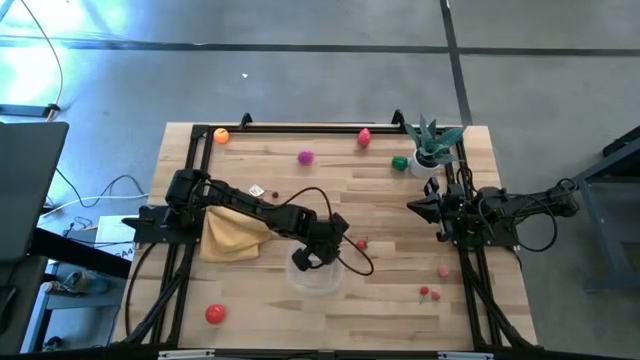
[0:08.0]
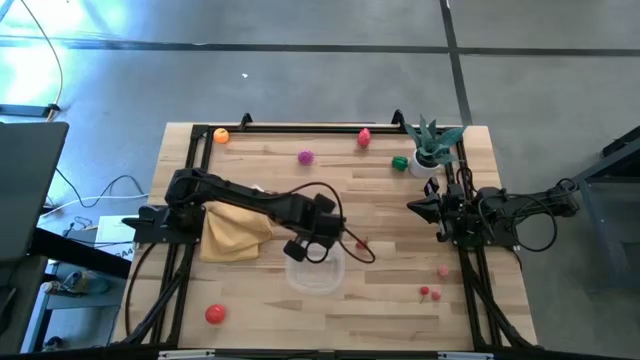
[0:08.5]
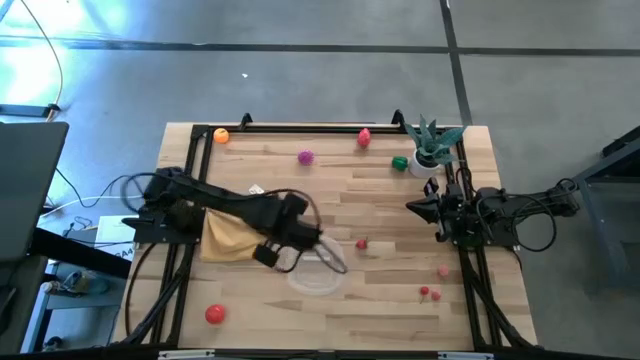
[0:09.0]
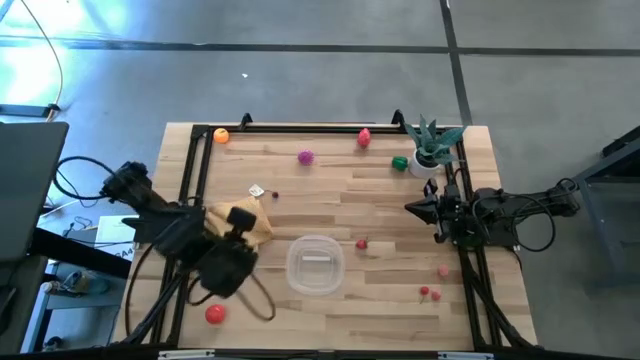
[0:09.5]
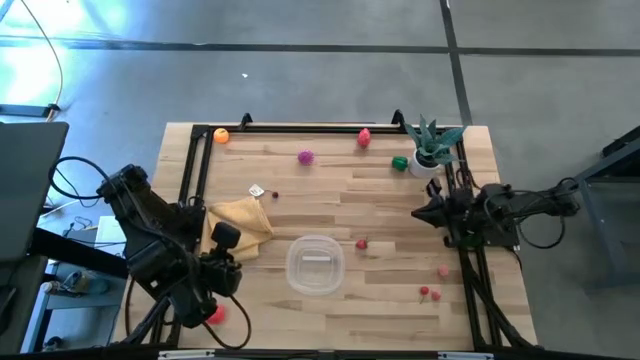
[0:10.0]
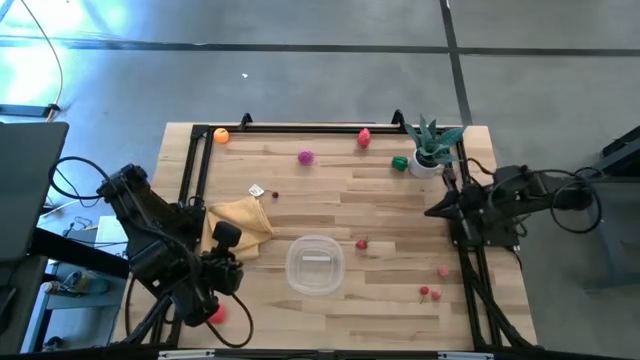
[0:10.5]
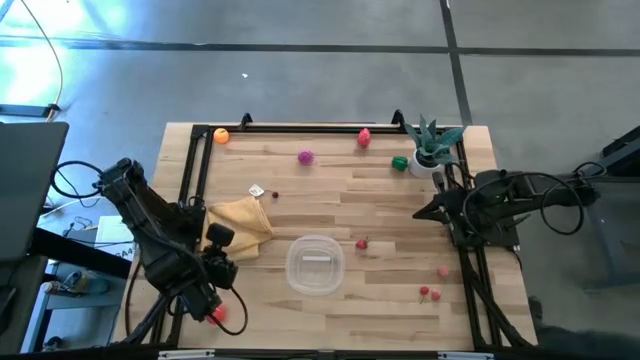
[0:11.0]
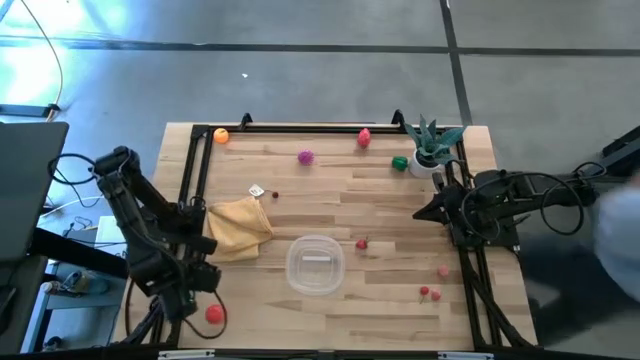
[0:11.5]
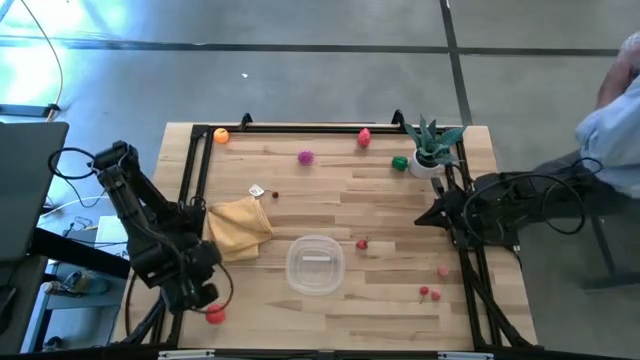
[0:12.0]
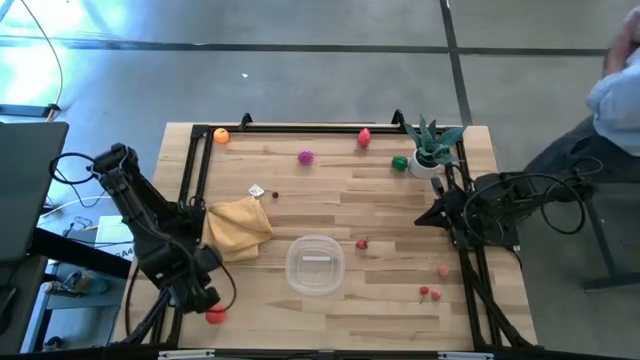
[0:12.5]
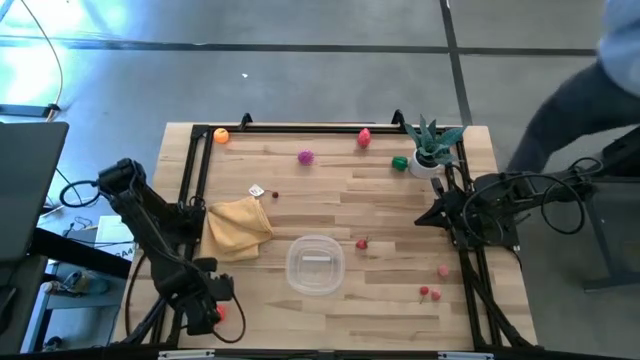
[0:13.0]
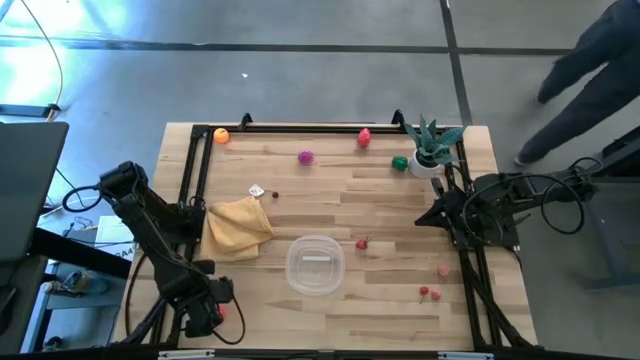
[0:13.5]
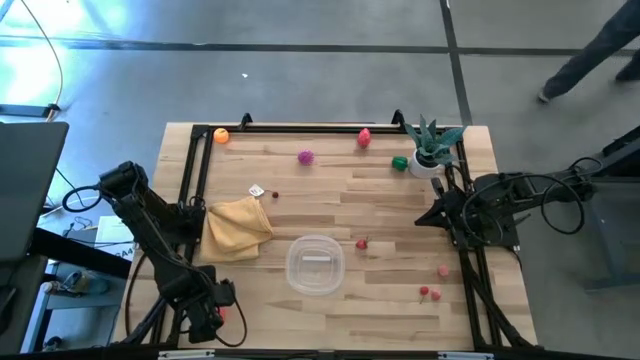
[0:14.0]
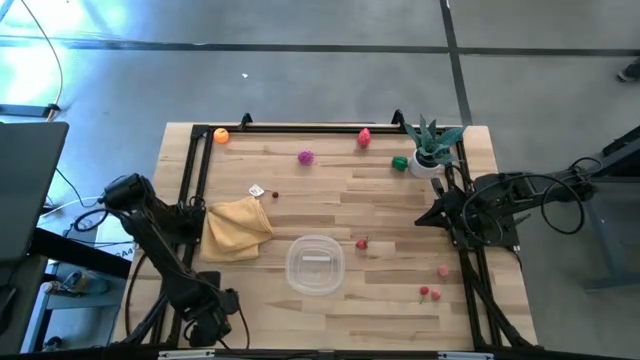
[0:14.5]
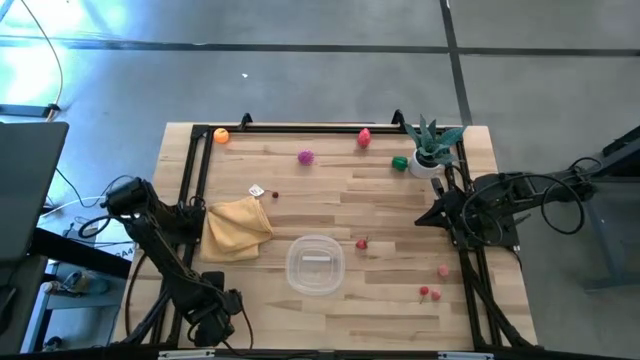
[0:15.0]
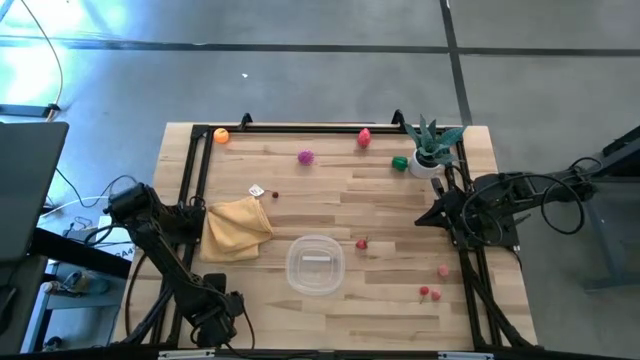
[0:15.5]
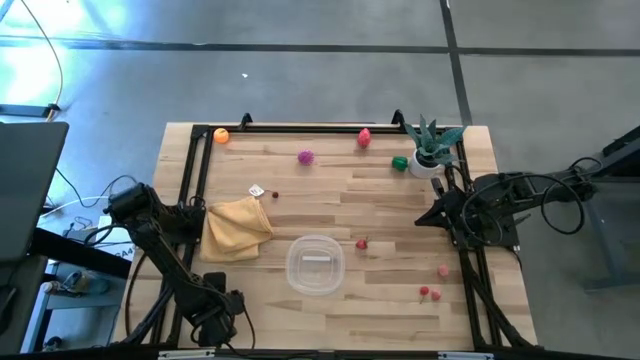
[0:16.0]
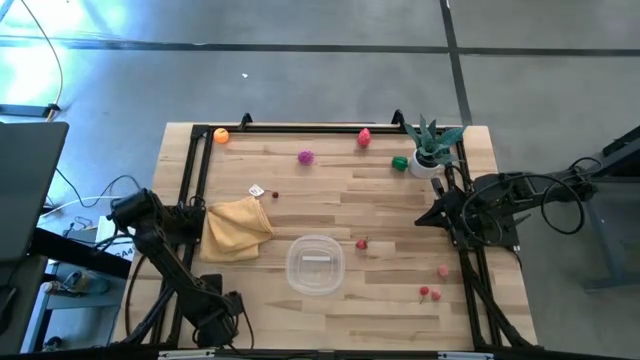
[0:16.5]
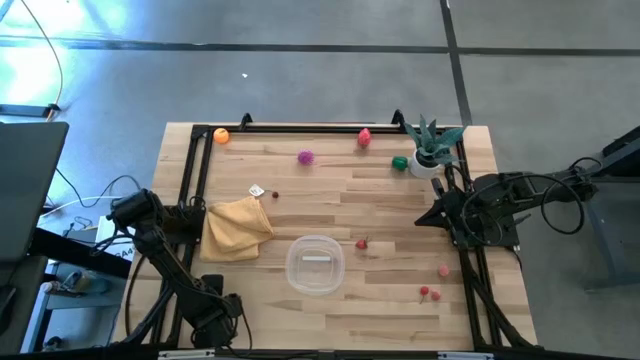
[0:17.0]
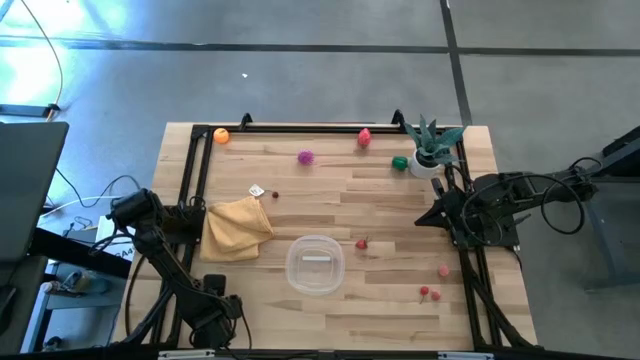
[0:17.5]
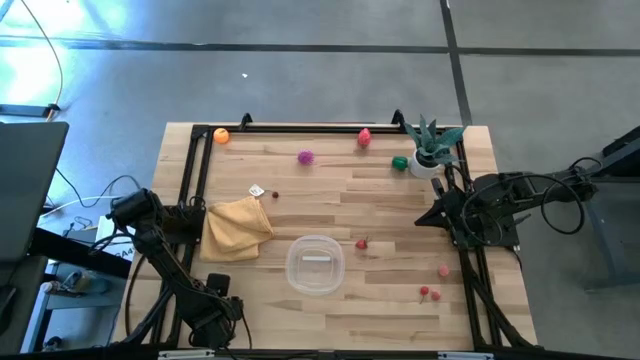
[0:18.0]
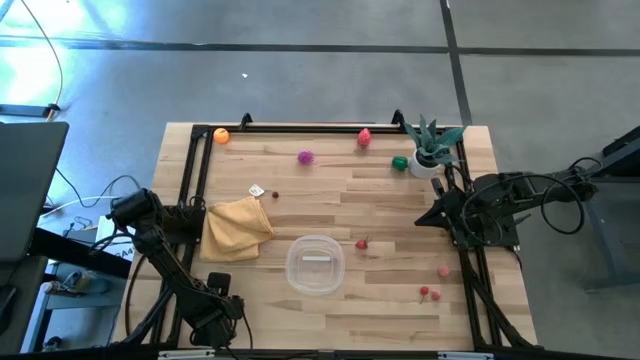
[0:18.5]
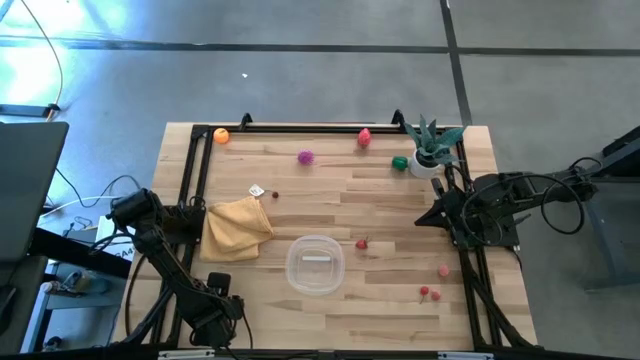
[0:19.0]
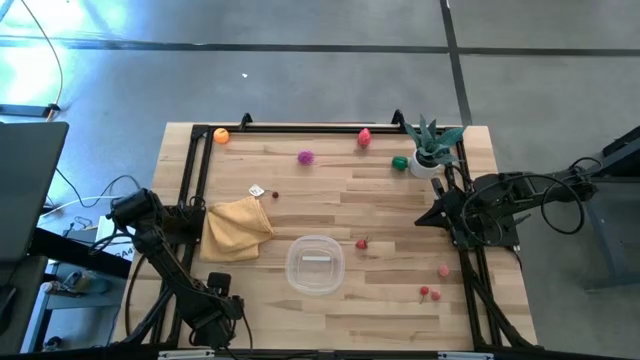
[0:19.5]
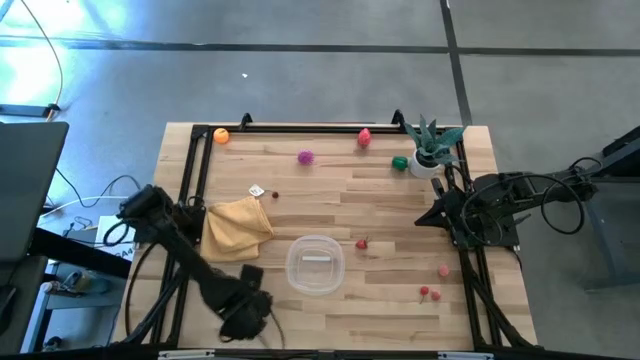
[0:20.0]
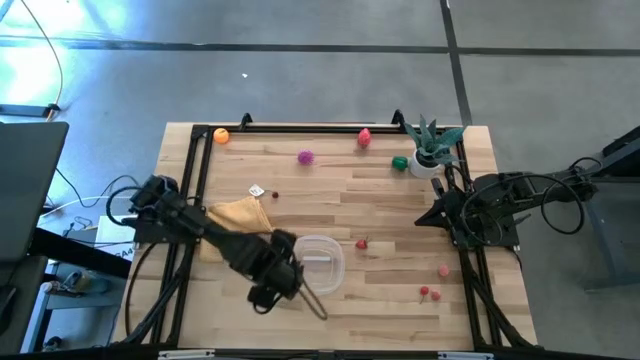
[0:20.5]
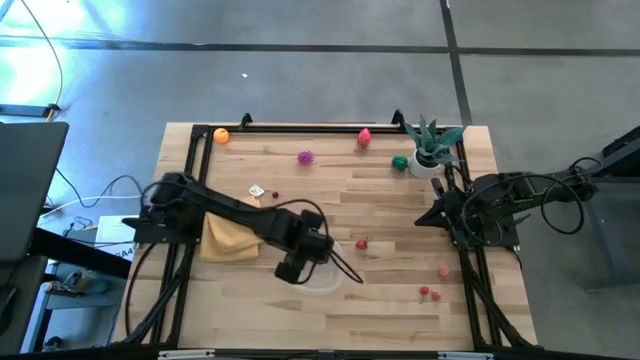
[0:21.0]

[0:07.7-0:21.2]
Task: Pick and placing Produce into tupperware
Put the red tomato into the transparent bin

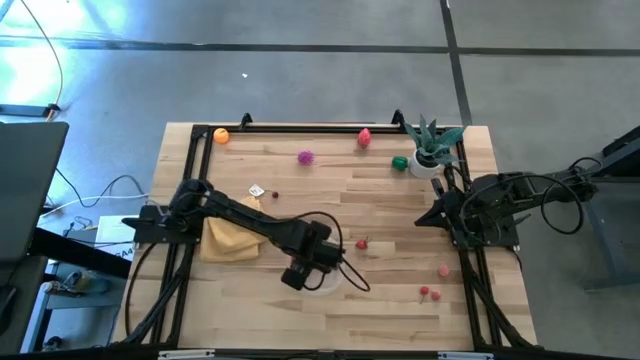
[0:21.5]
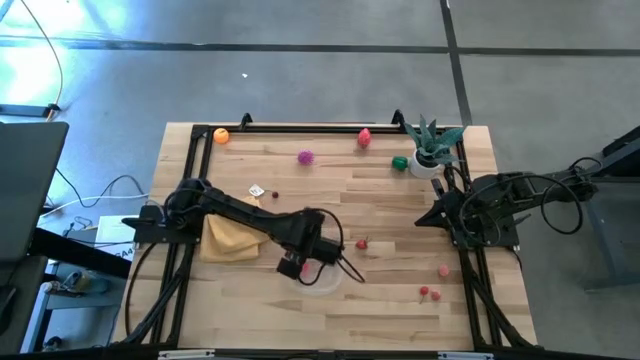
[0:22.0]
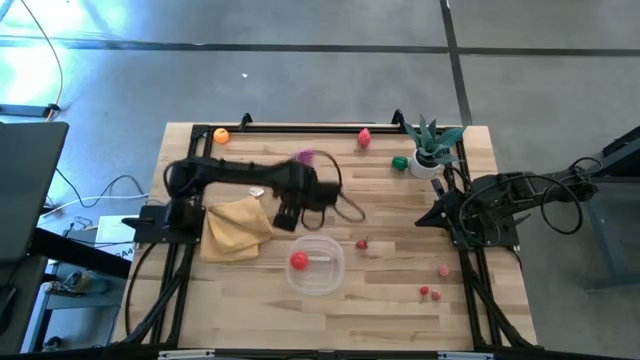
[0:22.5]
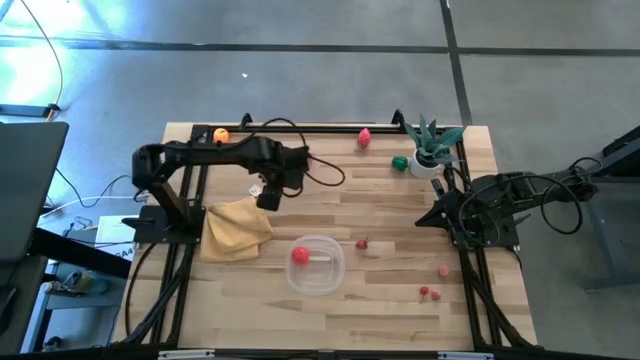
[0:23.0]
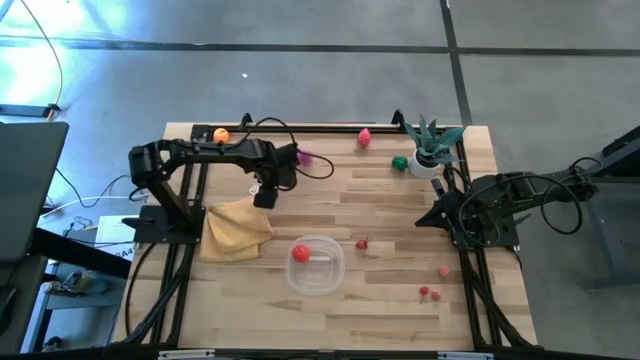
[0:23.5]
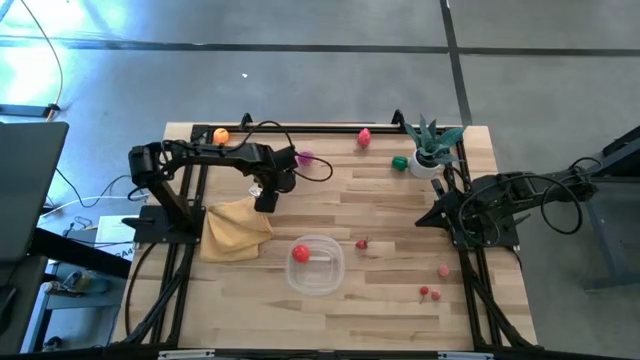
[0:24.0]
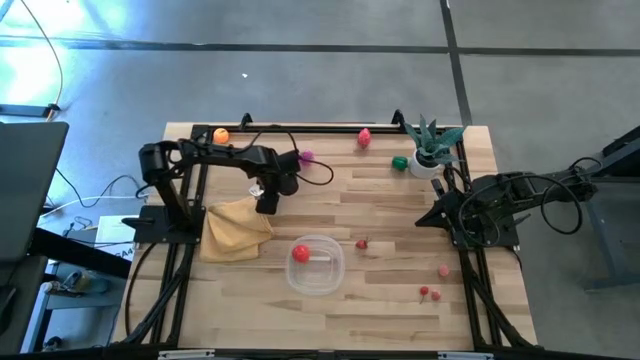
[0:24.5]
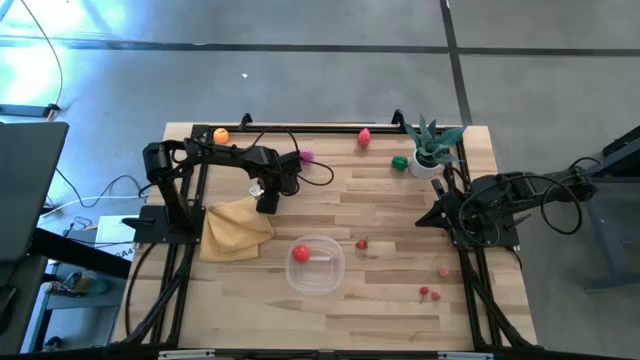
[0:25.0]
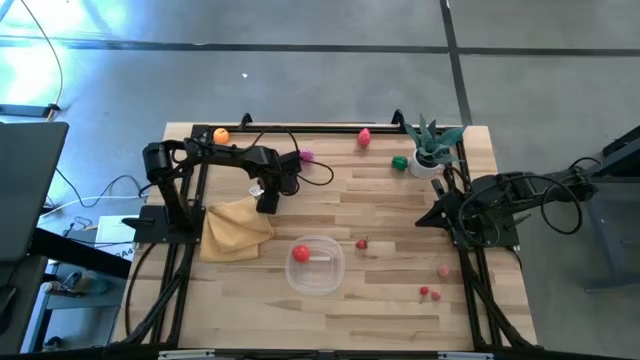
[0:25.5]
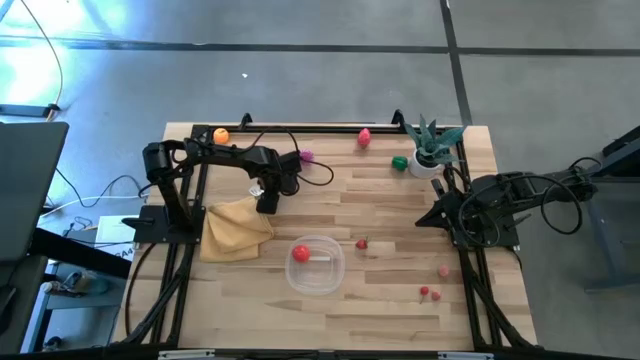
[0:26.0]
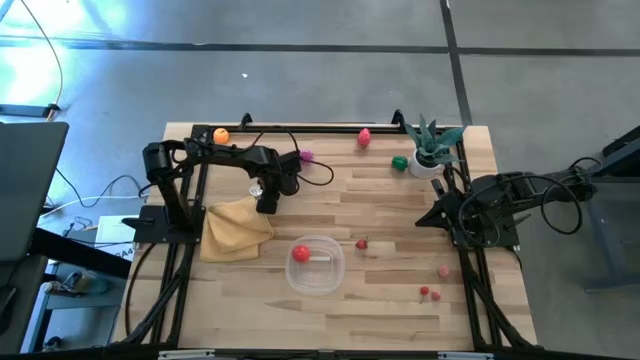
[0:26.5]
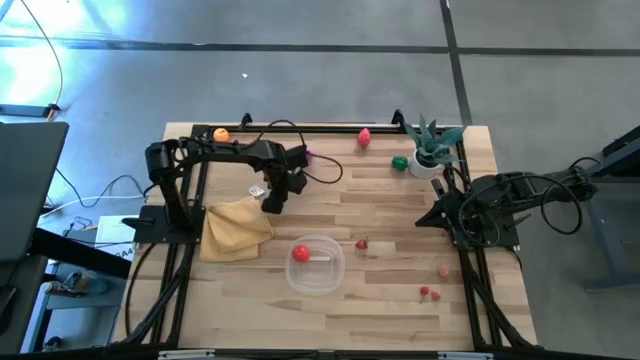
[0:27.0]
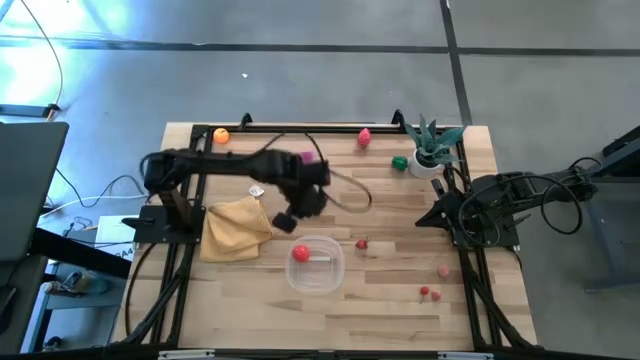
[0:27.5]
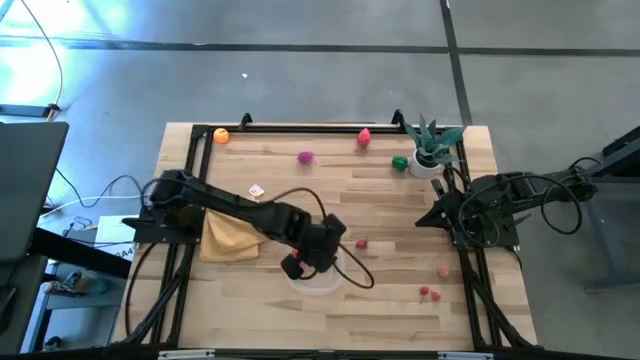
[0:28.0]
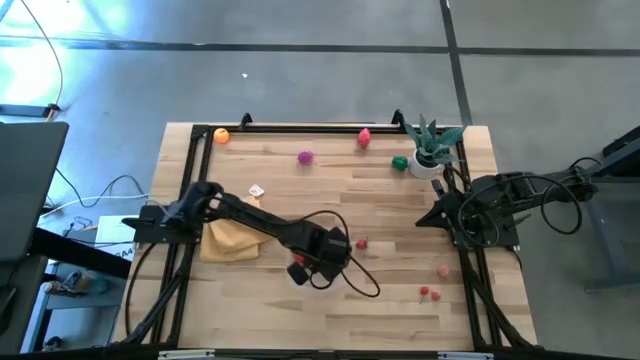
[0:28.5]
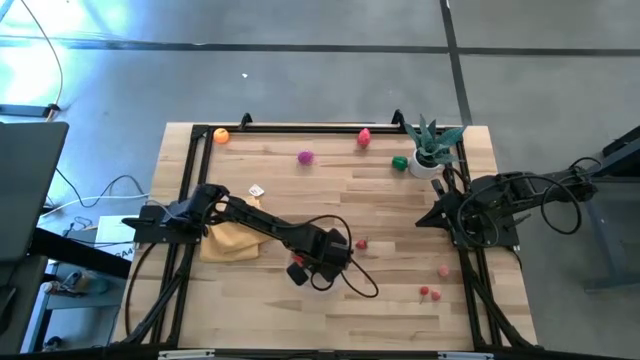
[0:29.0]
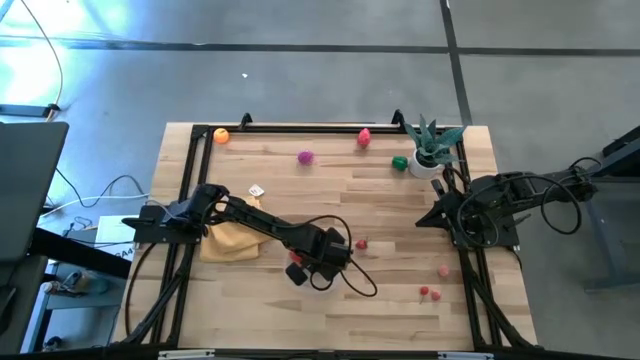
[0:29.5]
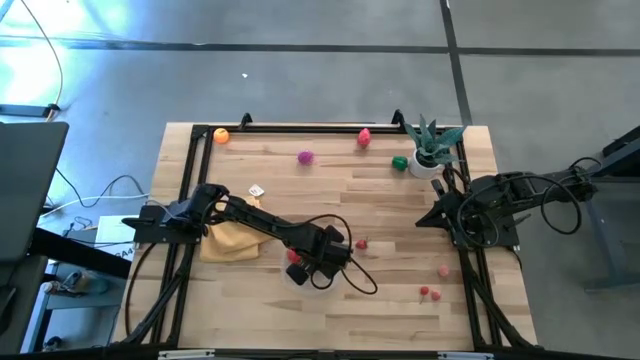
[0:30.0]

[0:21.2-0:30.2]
Put the top red cherry into the transparent bin
